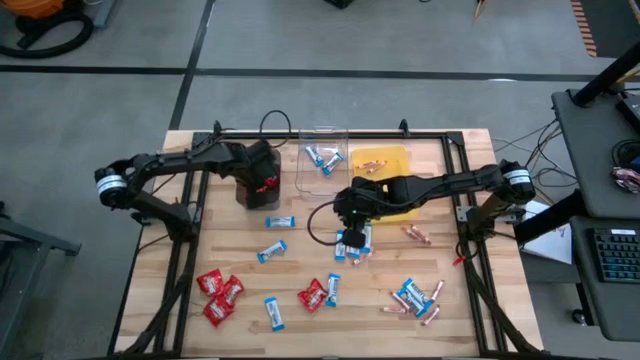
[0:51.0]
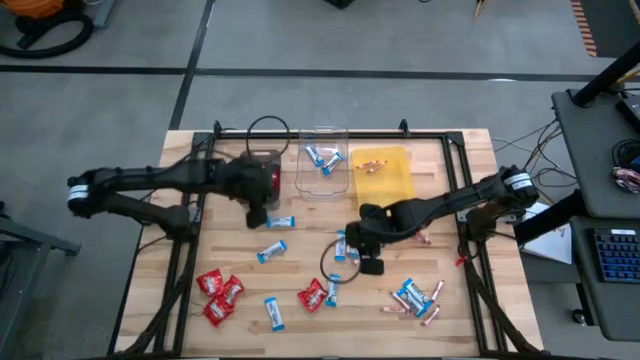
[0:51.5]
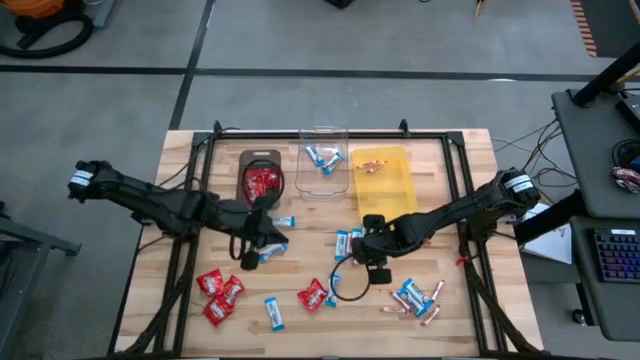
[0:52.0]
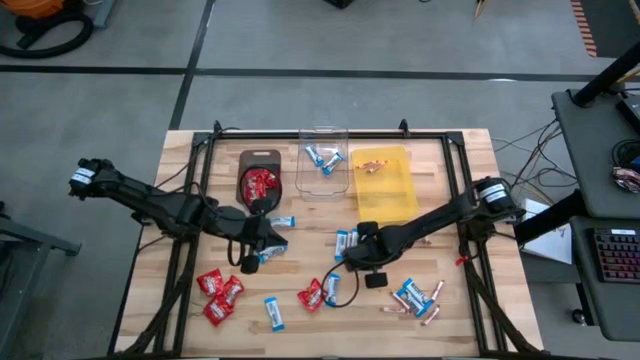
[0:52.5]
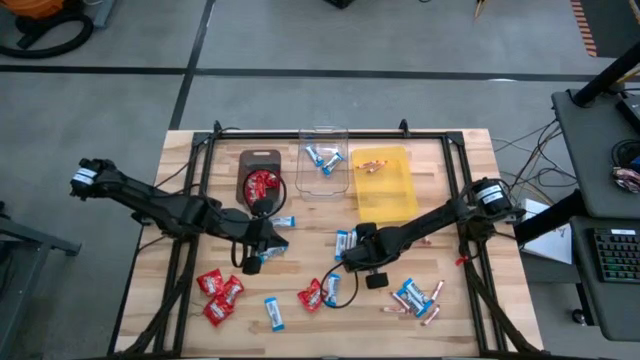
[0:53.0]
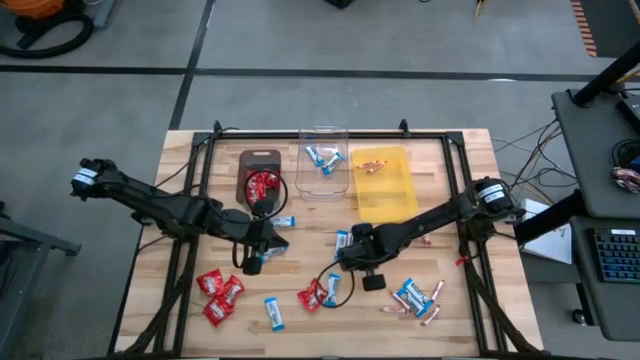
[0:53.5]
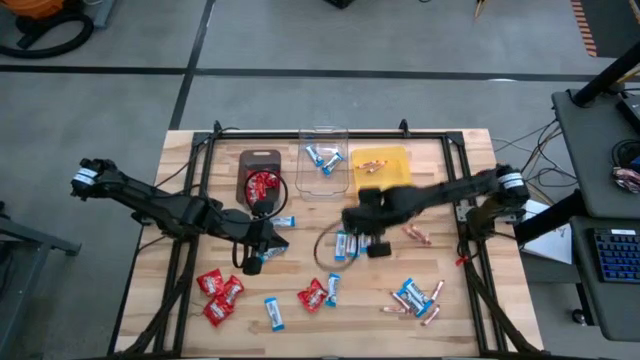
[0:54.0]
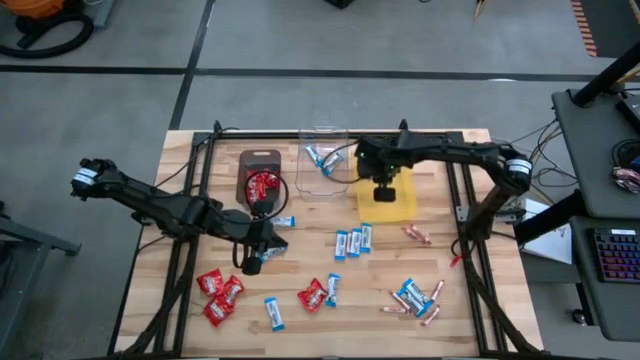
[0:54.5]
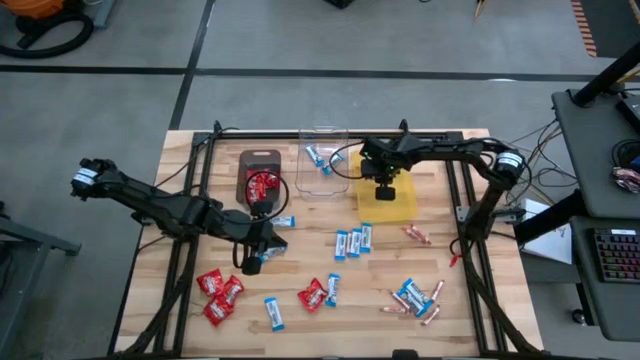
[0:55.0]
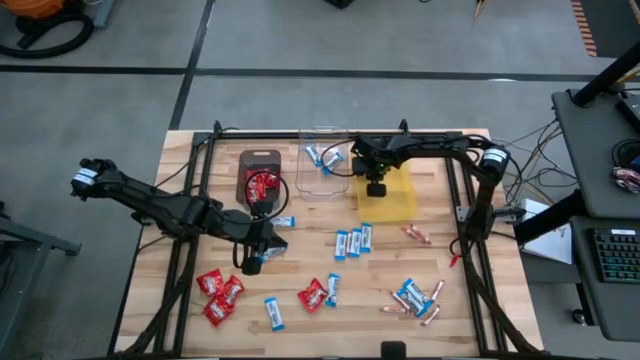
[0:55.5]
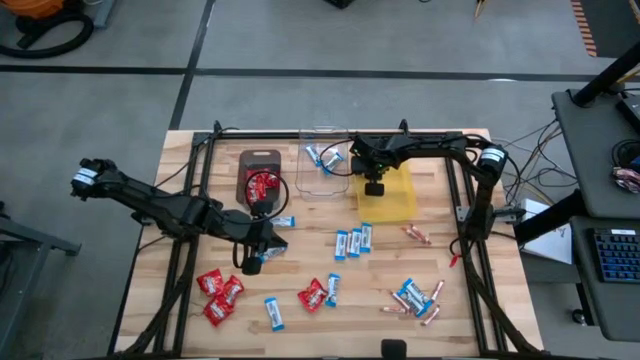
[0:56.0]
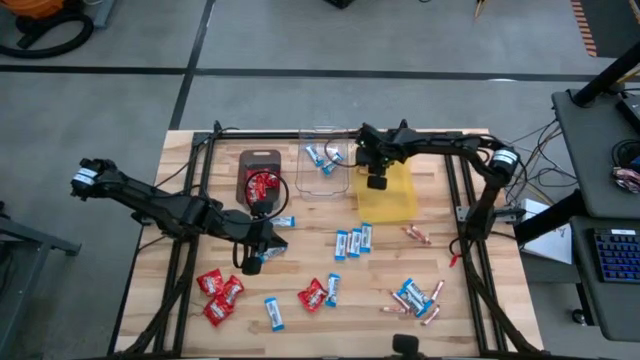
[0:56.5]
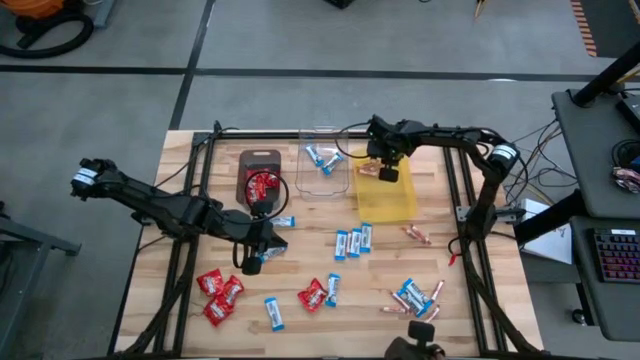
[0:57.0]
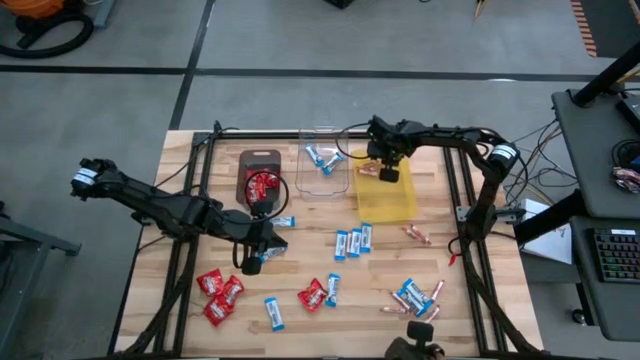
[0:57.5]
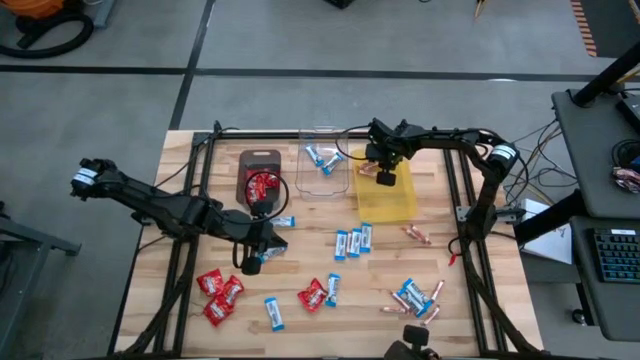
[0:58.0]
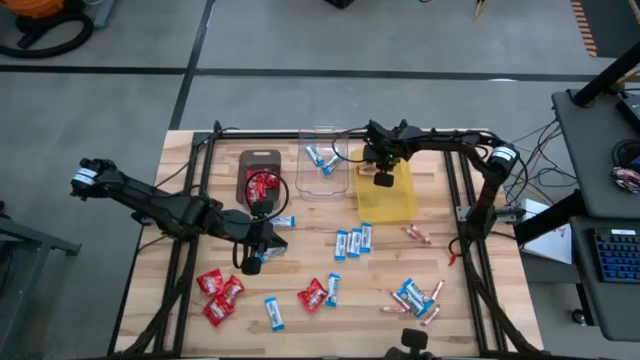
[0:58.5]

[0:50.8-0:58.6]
Task: Sort candy
Put the white-red candy into the yellow bin

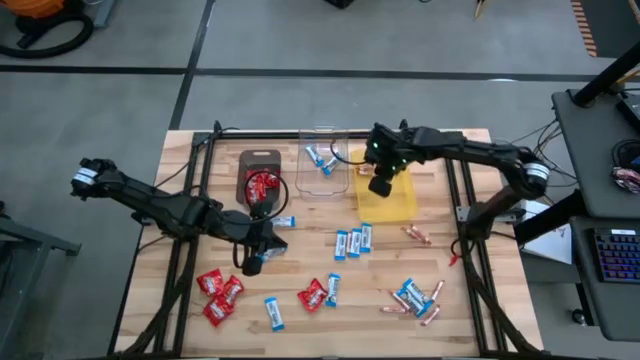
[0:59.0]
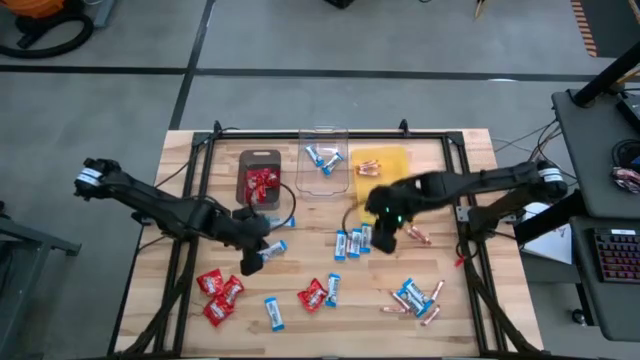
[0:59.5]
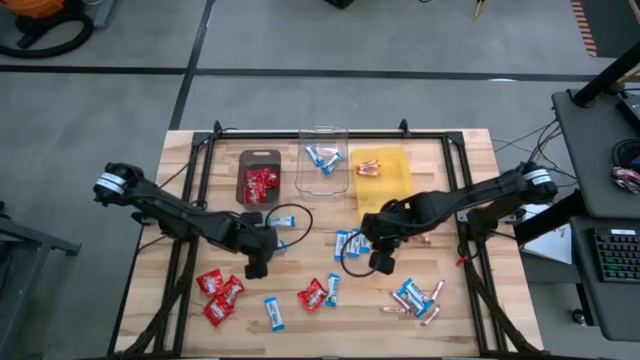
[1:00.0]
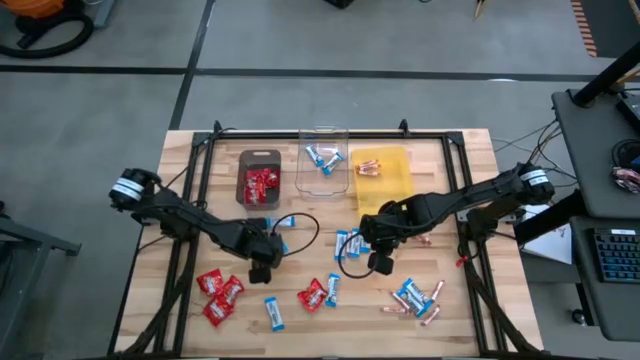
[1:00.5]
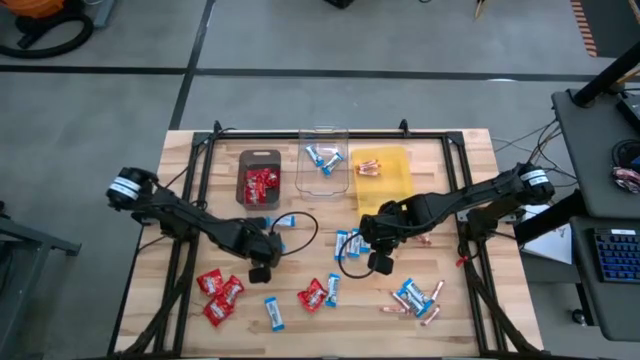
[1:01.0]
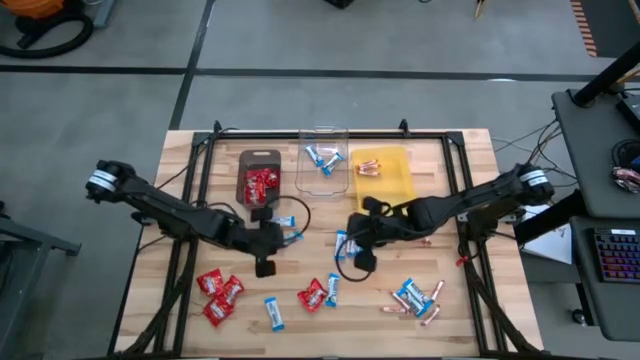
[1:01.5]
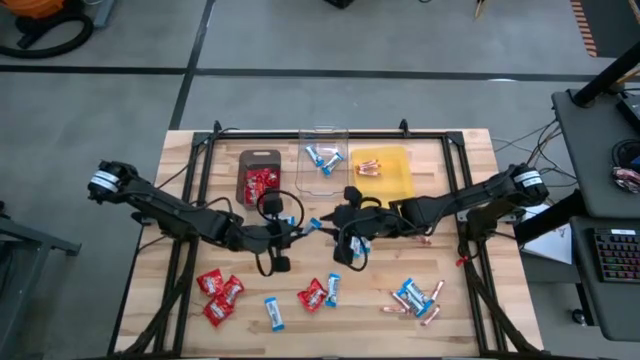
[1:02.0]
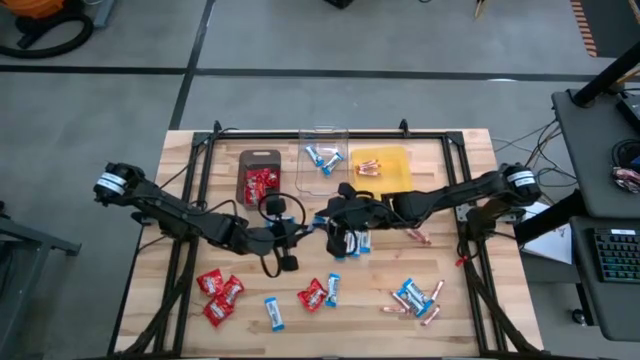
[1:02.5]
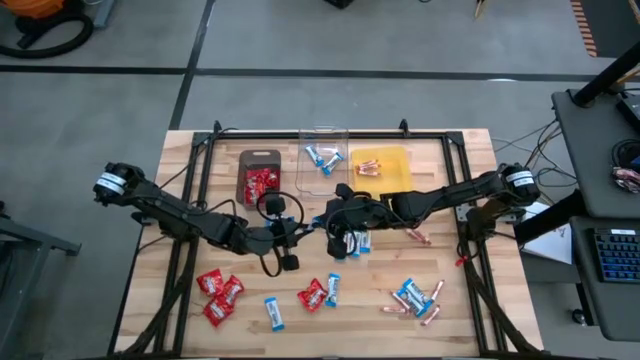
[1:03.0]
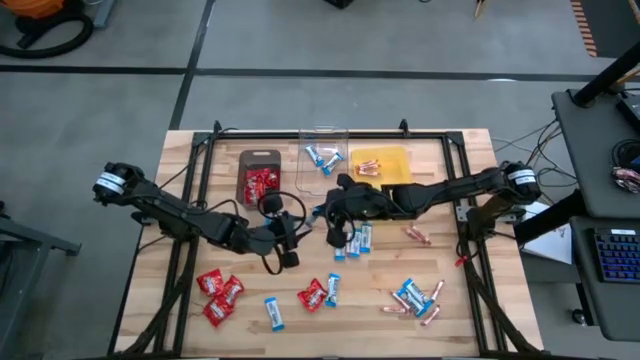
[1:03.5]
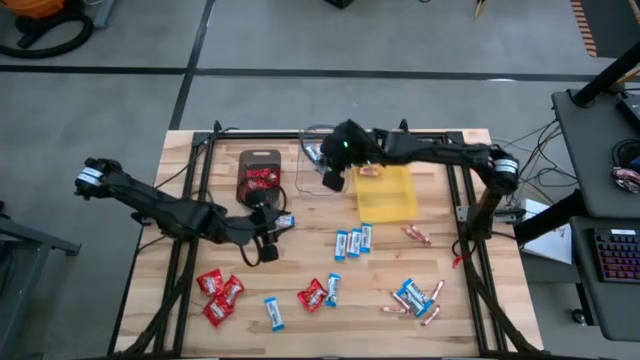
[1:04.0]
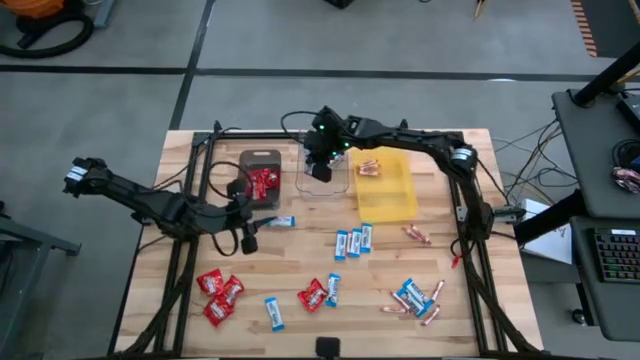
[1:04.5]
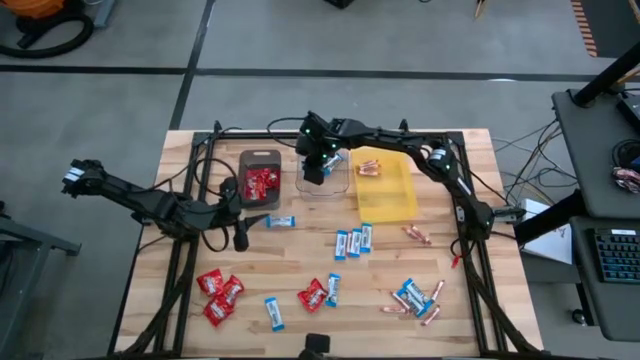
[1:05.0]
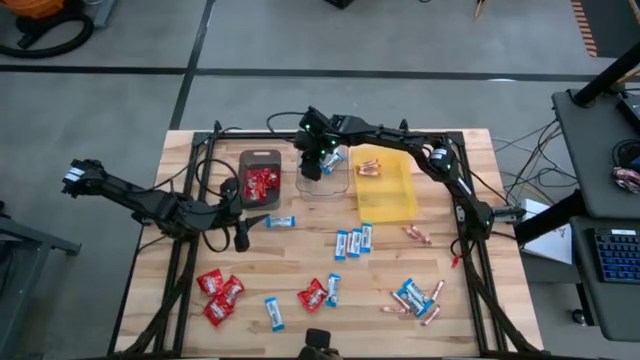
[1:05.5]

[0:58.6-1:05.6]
Put the white chocolate into the transparent bin

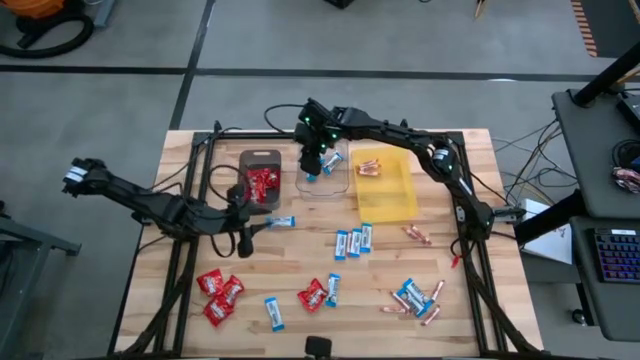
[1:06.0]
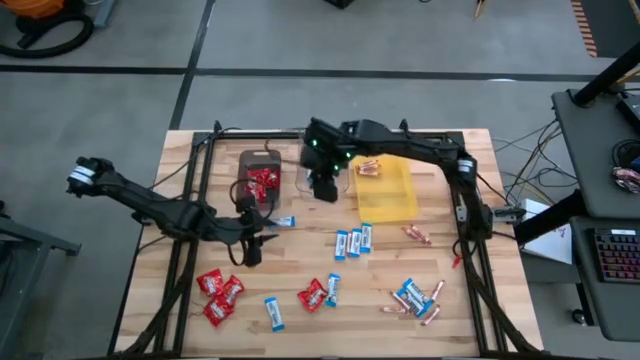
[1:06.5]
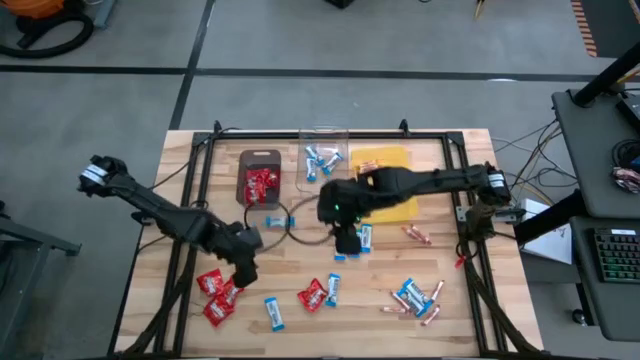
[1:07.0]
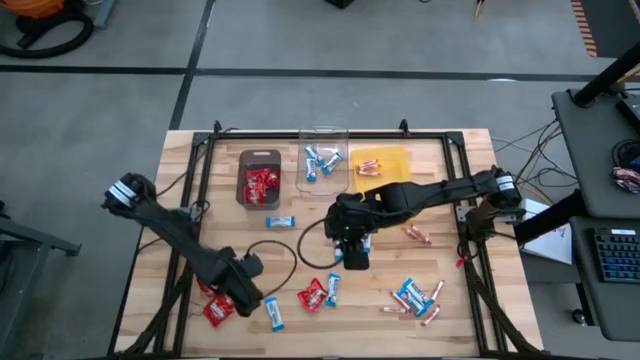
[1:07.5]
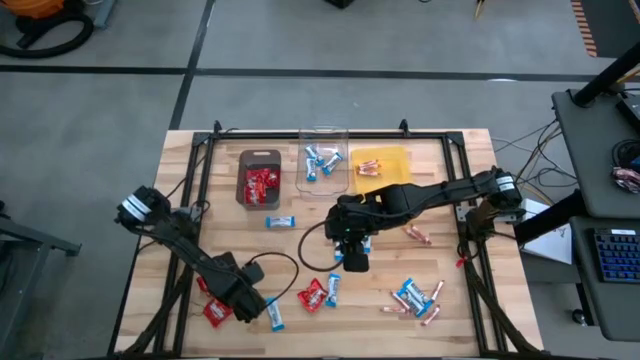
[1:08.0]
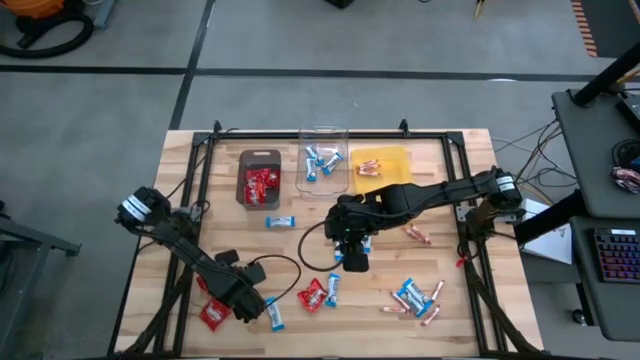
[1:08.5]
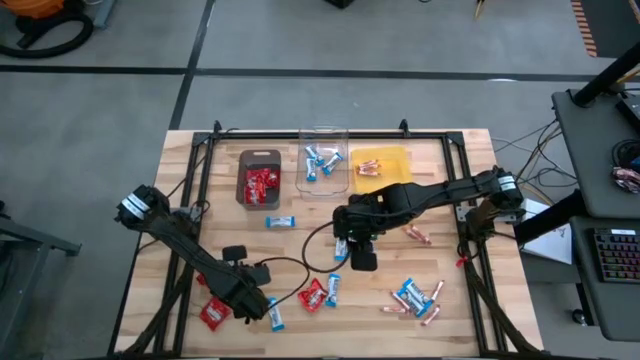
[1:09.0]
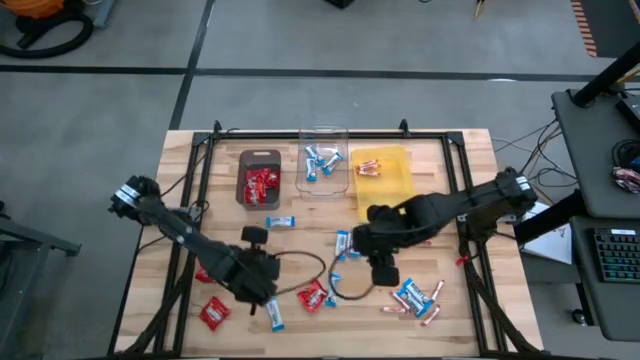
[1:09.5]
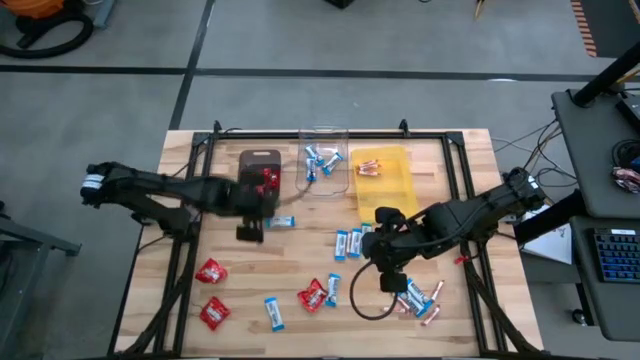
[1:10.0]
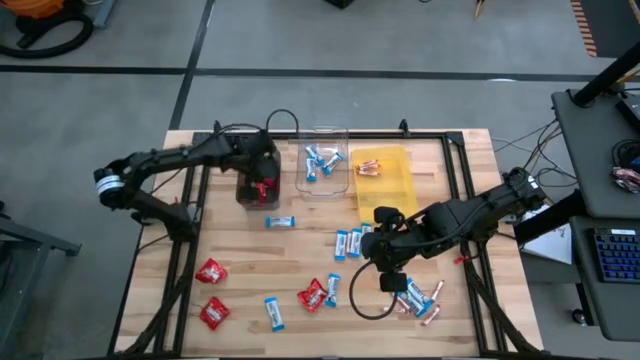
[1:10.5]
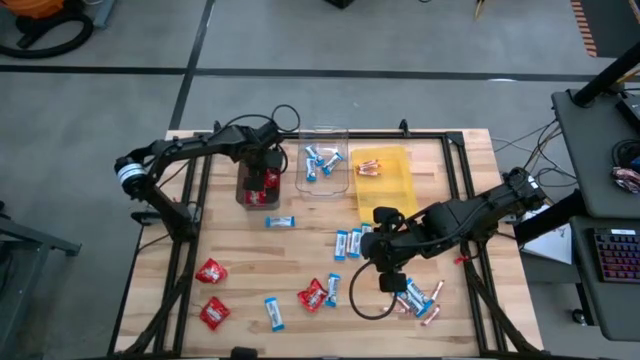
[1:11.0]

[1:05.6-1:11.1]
Put the red candy into the black bin

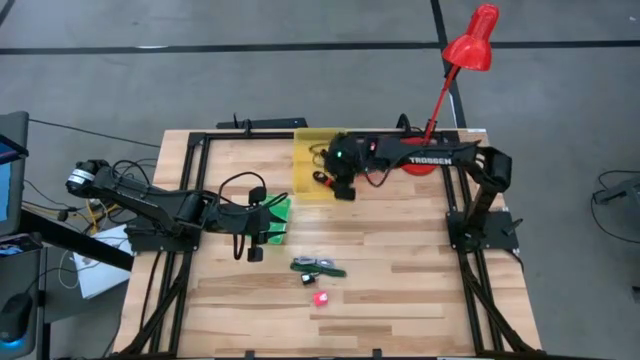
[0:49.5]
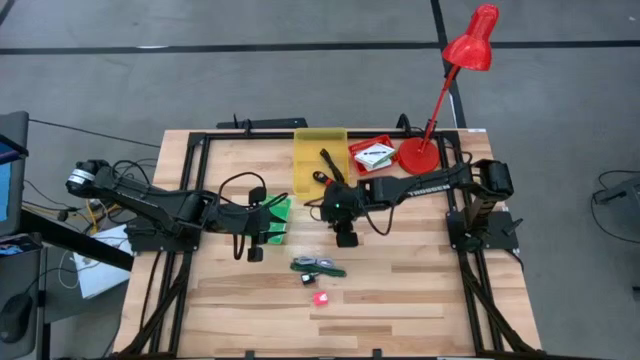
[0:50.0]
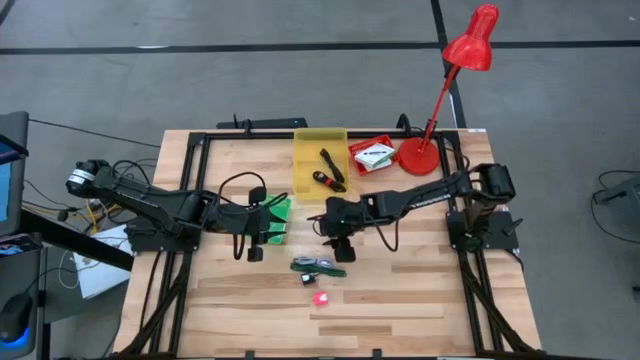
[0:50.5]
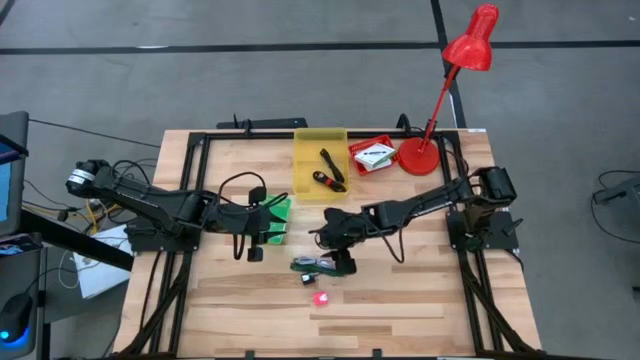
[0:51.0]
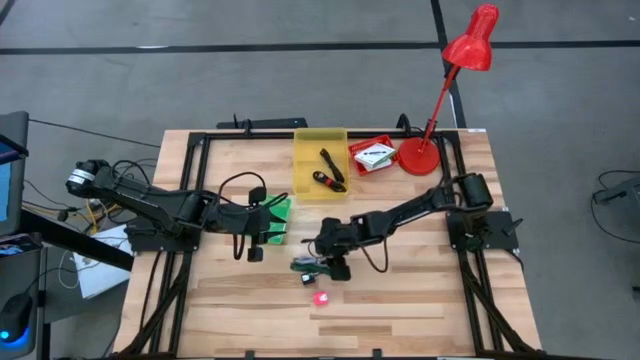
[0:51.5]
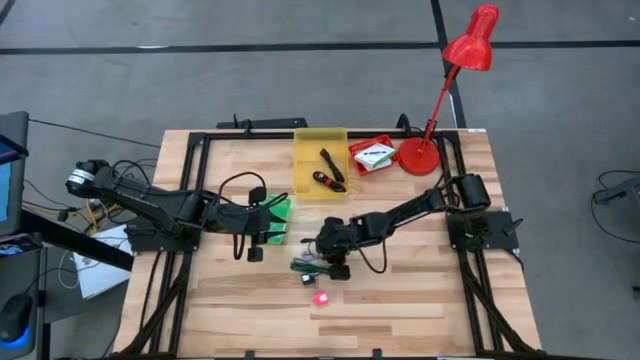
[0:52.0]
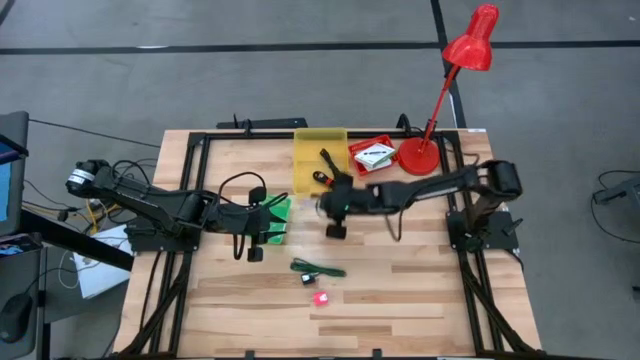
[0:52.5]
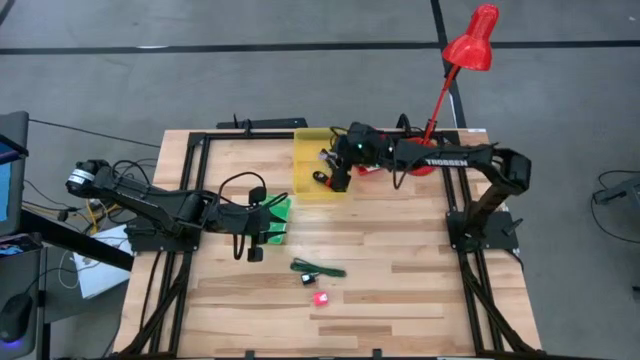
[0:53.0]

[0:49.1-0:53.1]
Task: Pick and place items into bin
Put the white charger cable into the yellow bin
